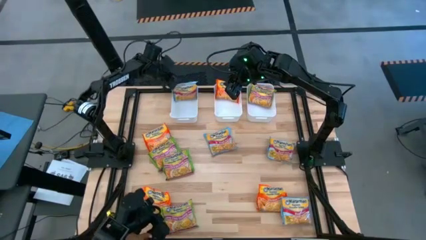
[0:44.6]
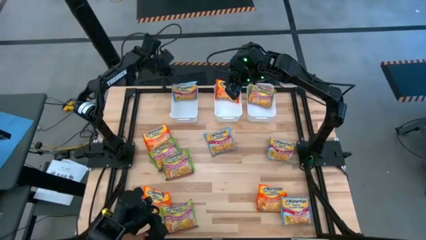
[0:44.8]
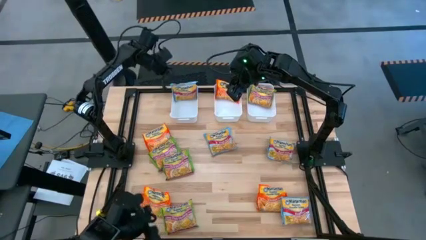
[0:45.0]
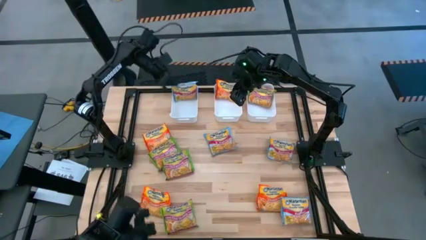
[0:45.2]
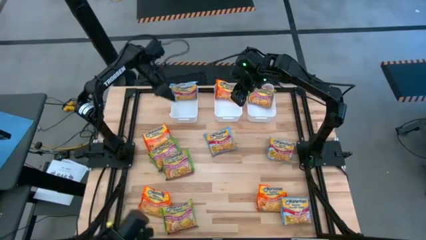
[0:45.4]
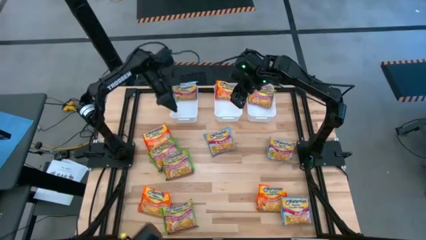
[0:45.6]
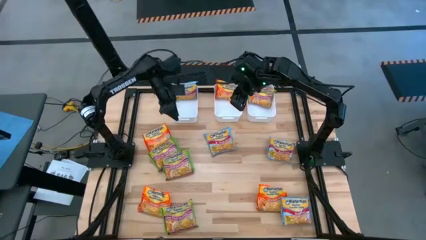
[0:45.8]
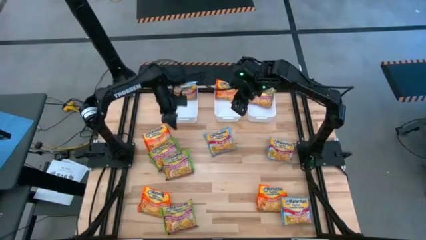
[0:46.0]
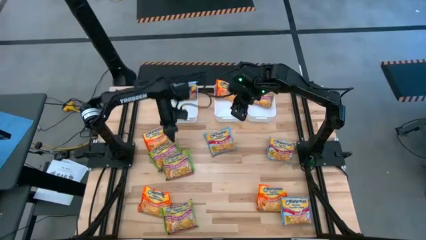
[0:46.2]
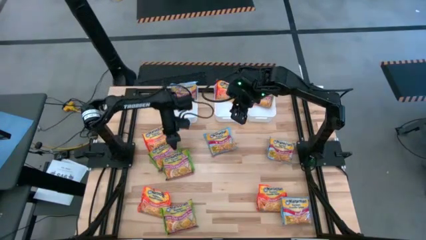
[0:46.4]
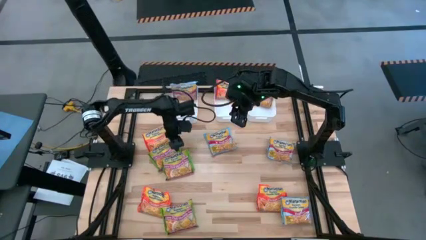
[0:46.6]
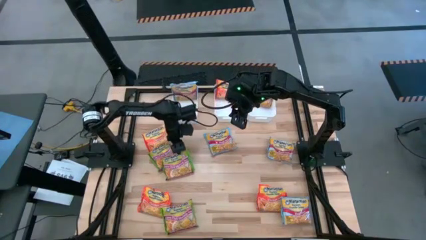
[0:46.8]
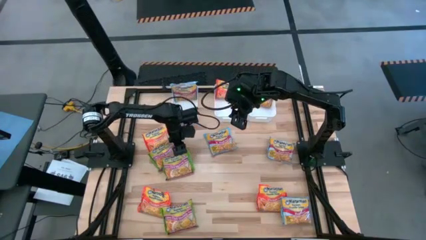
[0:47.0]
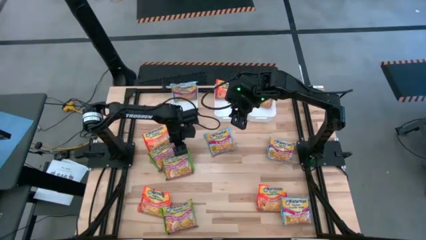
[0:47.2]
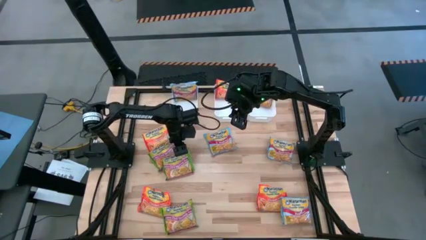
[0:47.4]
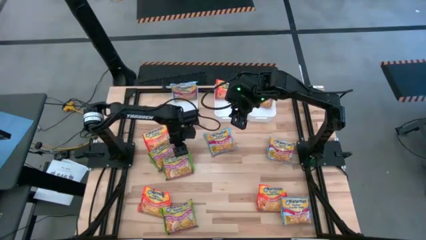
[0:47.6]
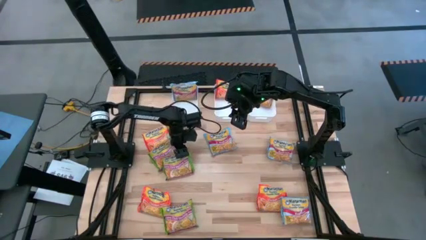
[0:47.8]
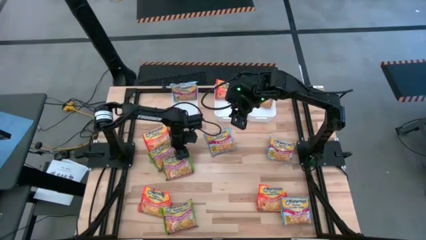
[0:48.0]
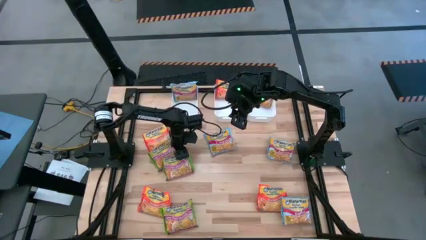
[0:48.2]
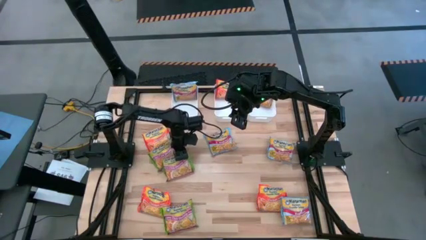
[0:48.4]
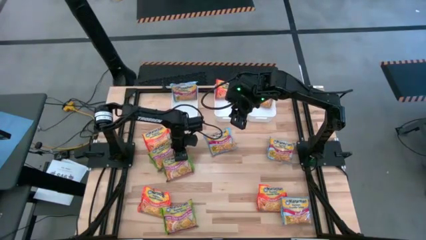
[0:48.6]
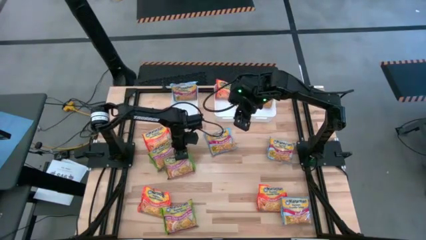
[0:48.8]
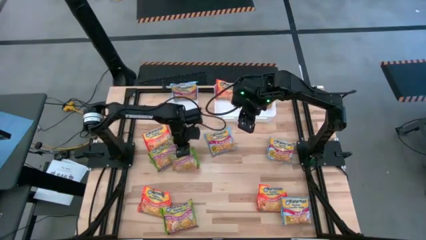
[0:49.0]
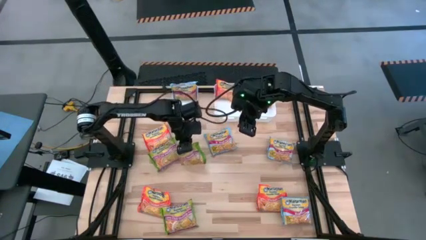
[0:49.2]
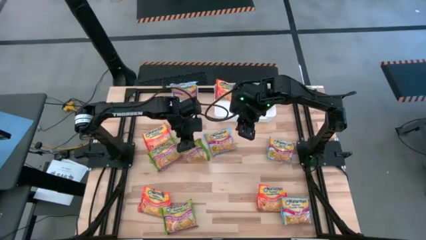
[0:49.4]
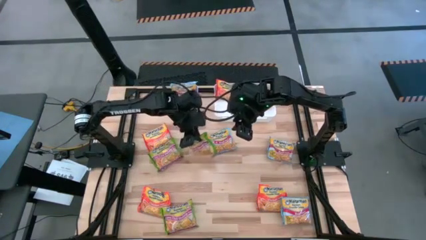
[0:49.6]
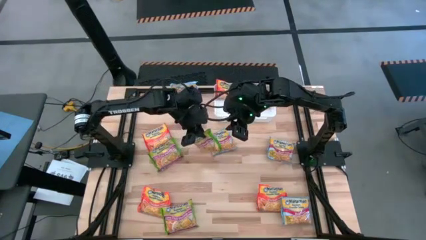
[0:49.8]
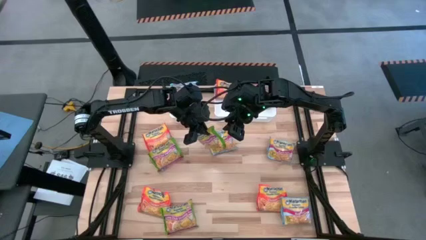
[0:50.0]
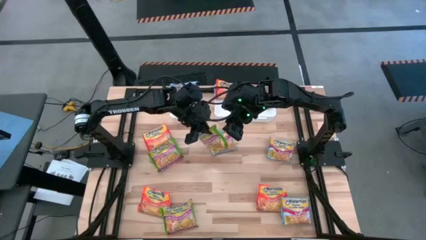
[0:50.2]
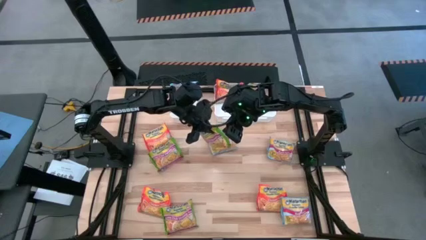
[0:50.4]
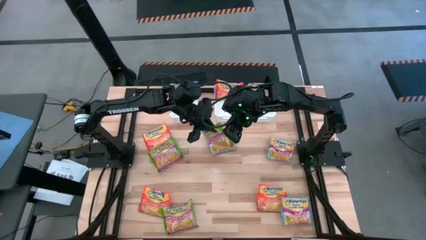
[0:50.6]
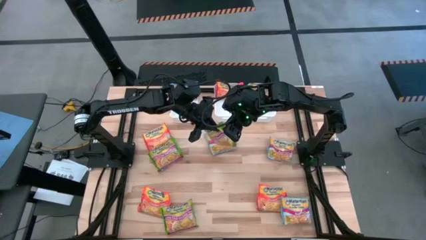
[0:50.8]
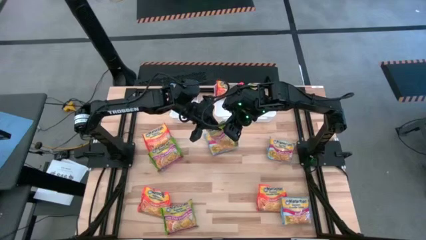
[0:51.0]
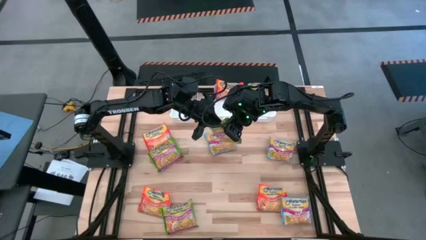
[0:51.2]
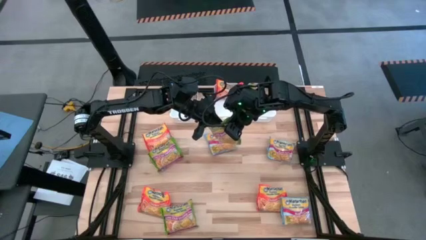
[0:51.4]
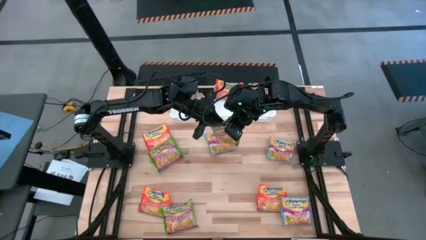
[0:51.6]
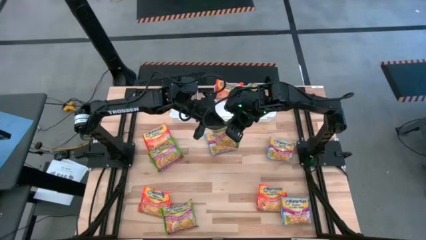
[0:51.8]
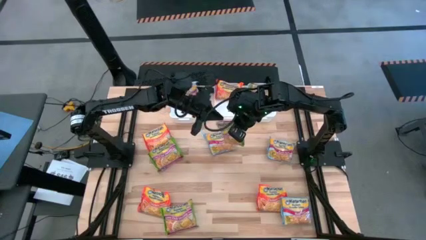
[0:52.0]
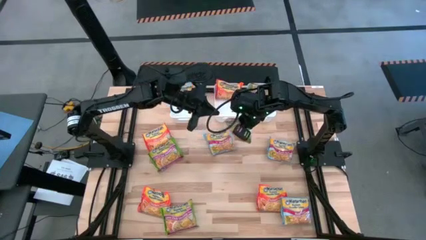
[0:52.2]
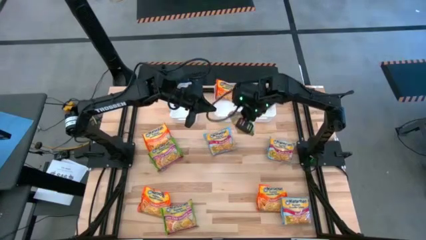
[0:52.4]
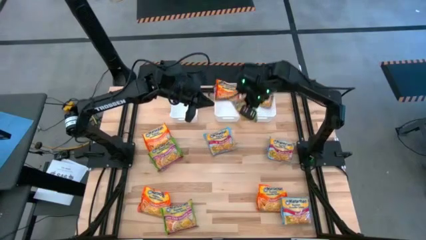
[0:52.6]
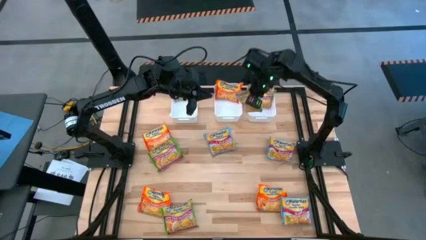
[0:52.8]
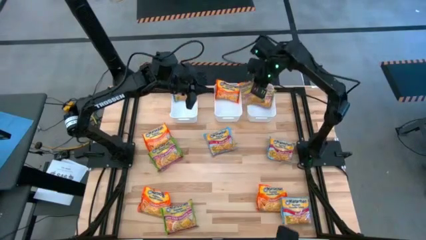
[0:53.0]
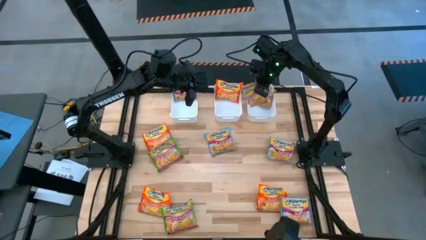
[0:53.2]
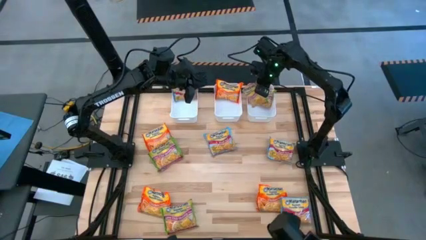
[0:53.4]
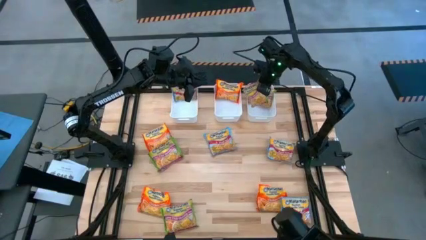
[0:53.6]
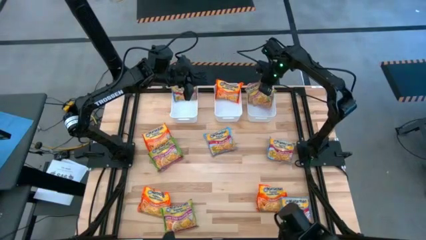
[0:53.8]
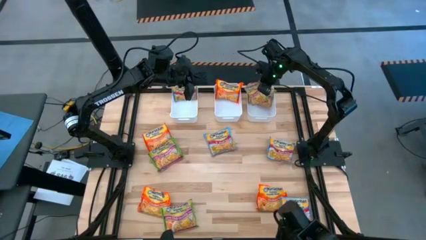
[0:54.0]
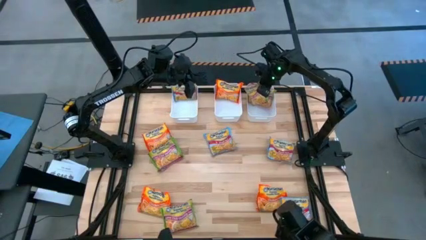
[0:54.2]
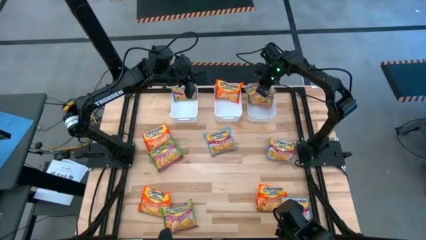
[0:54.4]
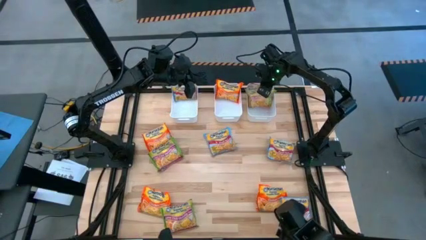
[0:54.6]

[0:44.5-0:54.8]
Task: Sort Maruchan noodles
Put the green noodle pack into the right white bin
